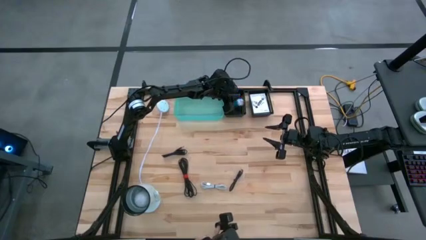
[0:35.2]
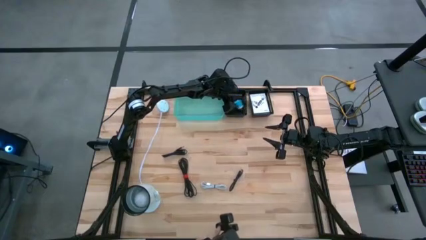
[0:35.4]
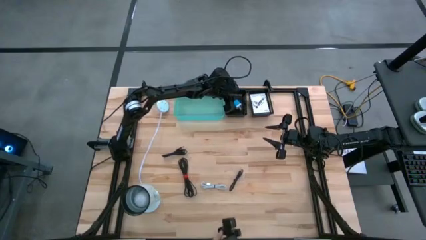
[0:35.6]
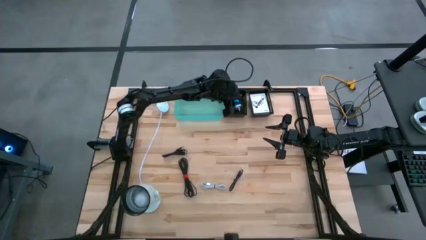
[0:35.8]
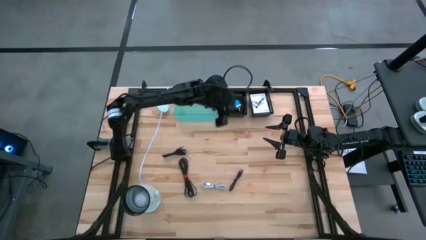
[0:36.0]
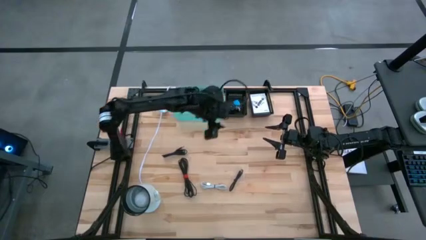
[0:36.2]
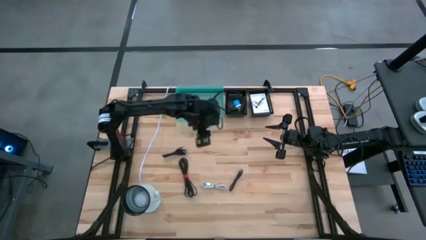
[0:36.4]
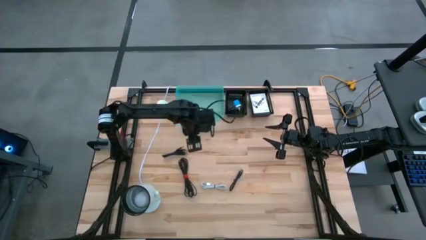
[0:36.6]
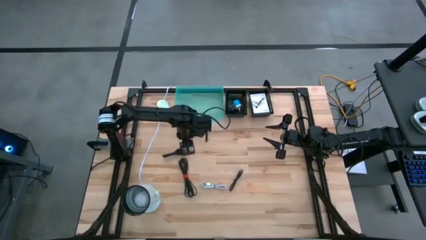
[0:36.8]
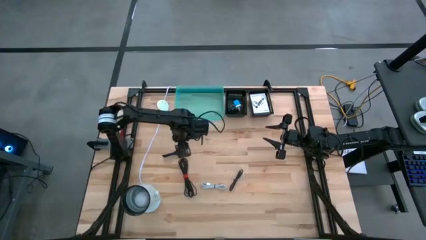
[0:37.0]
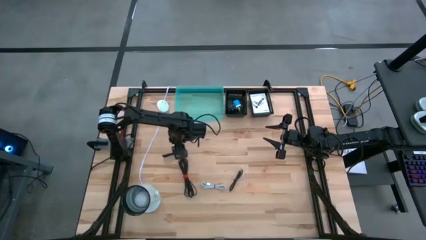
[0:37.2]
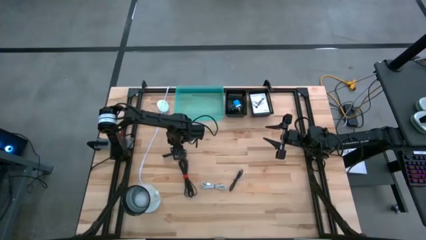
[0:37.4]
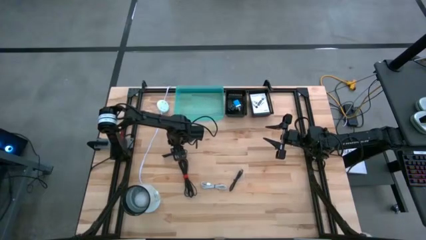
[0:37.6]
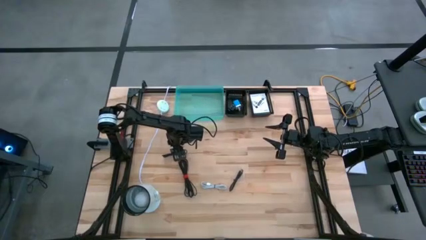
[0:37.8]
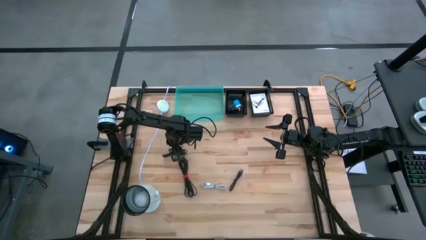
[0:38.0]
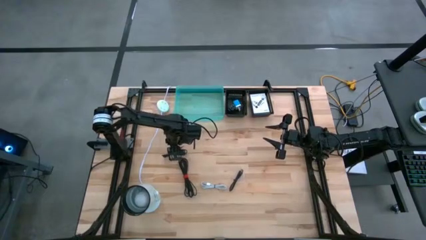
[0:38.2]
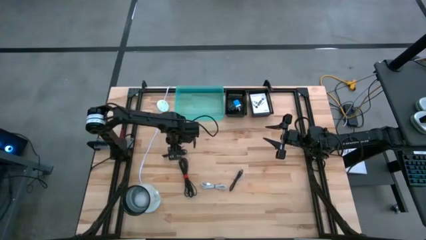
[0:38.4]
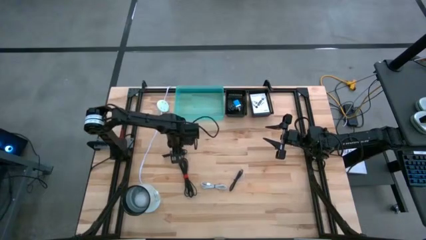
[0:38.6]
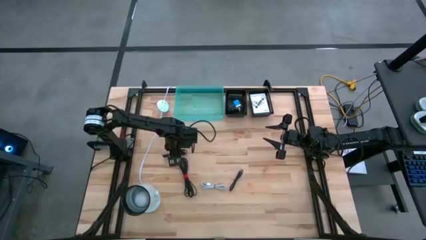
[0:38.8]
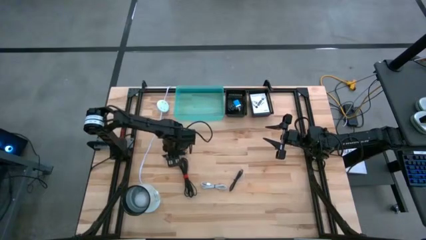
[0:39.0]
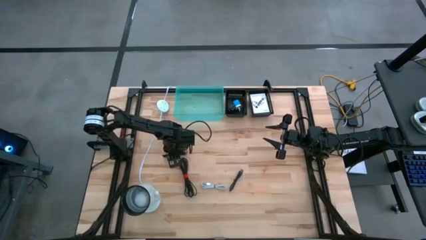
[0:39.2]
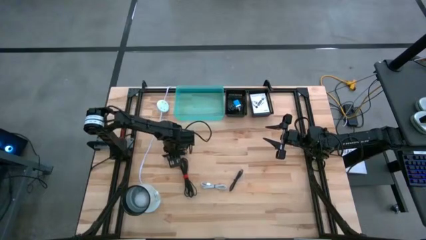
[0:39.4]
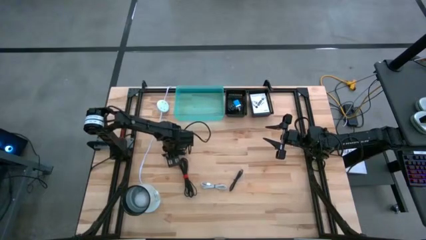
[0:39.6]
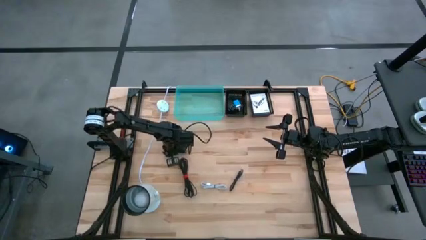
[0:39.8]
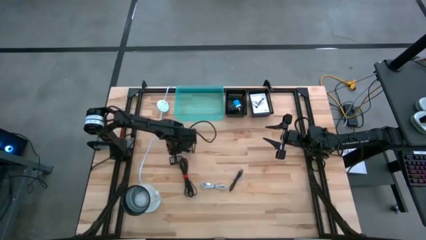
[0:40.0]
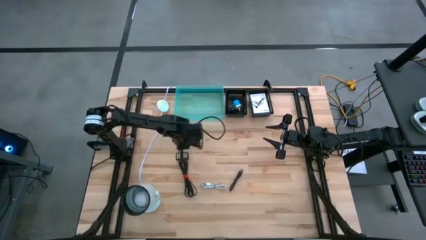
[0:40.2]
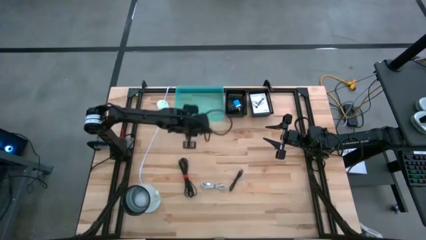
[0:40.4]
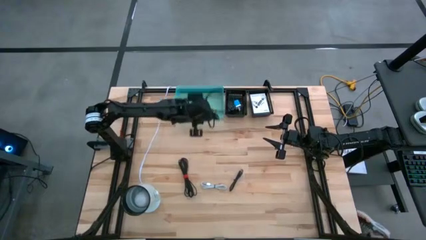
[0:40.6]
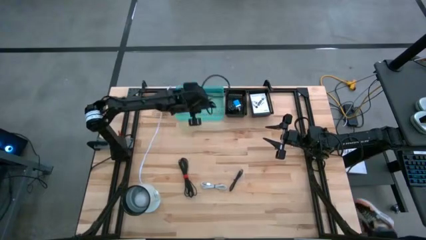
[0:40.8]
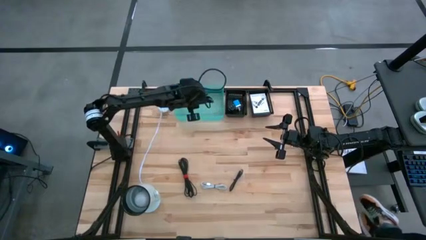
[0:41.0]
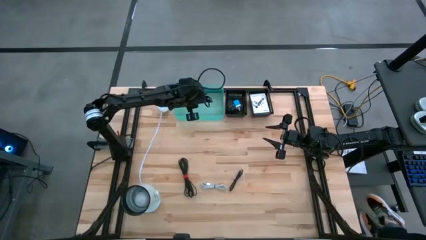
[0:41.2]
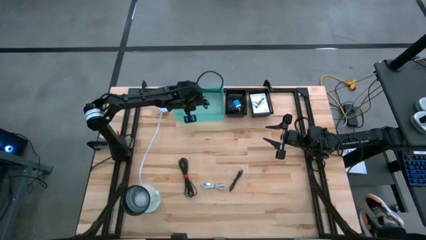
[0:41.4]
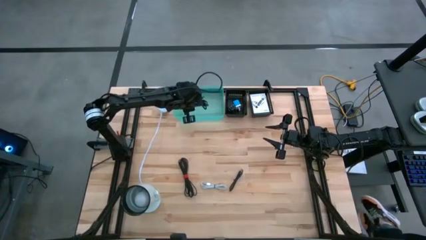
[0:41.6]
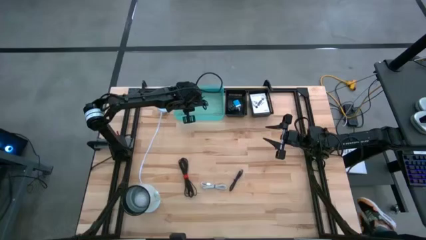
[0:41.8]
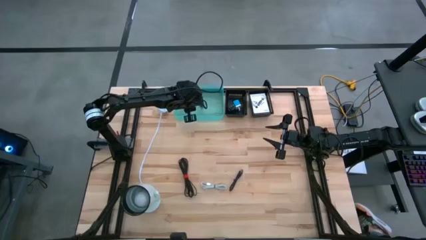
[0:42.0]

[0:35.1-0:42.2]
Task: Pick and place items into bin
Put the top left black charger cable into the blue bin

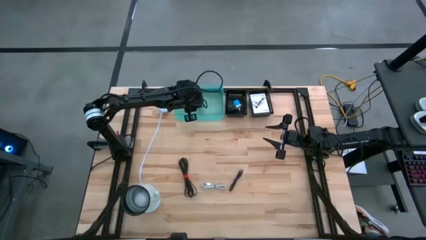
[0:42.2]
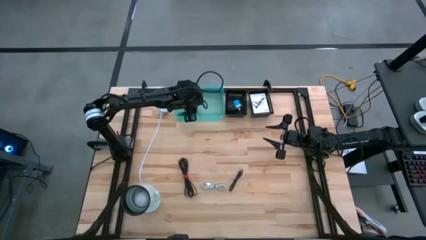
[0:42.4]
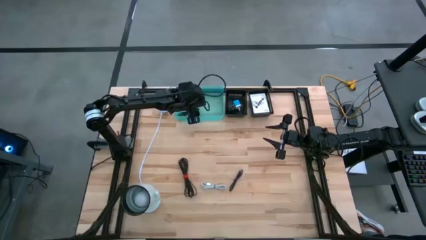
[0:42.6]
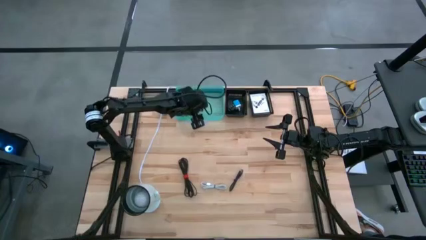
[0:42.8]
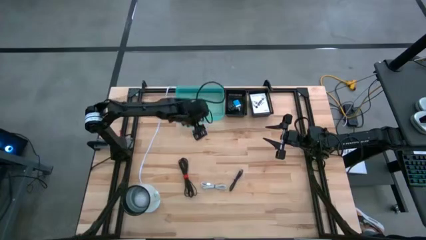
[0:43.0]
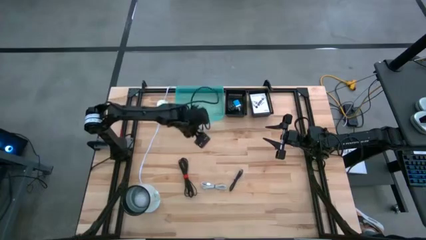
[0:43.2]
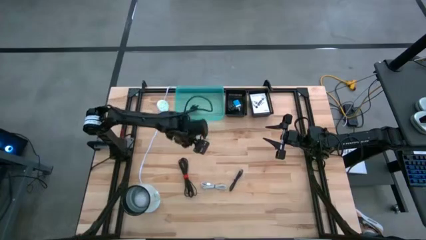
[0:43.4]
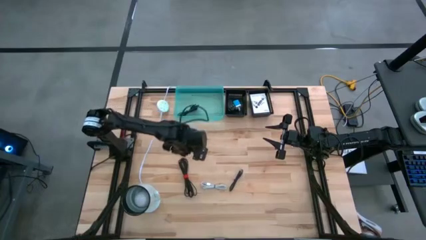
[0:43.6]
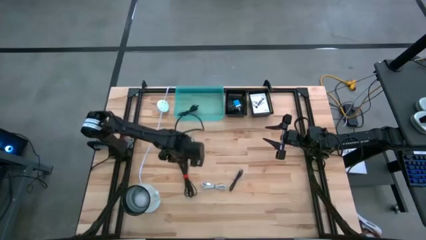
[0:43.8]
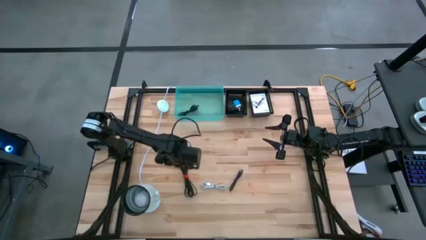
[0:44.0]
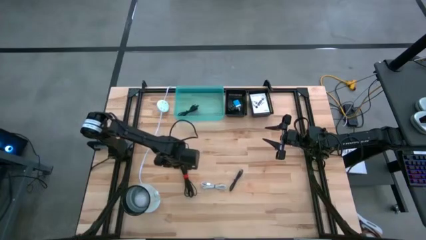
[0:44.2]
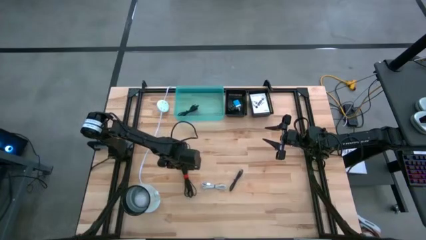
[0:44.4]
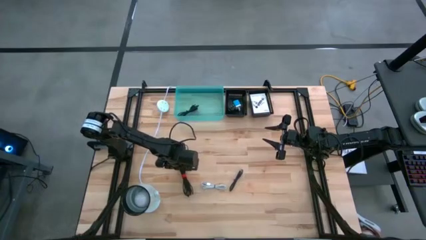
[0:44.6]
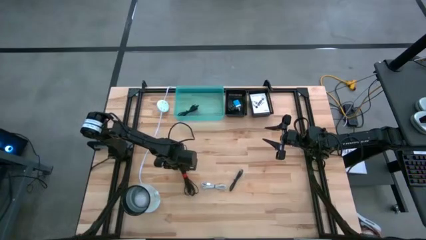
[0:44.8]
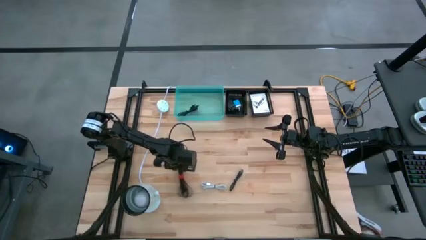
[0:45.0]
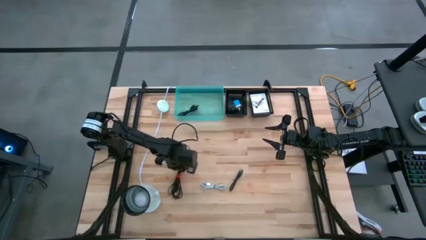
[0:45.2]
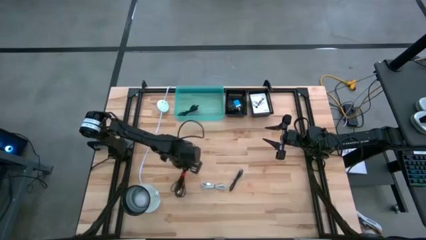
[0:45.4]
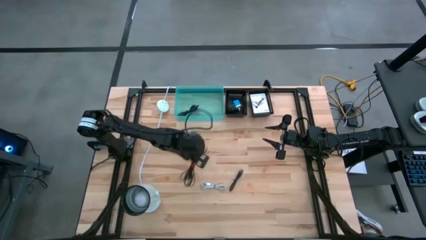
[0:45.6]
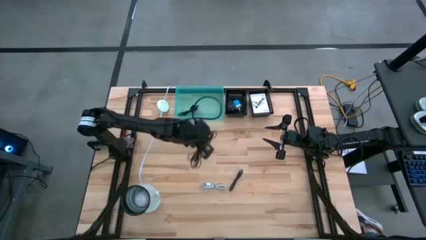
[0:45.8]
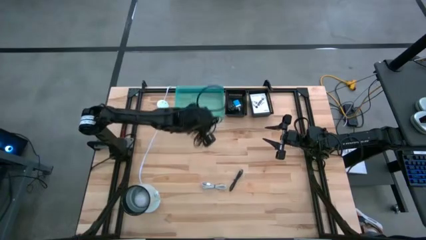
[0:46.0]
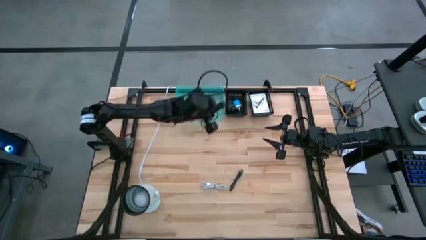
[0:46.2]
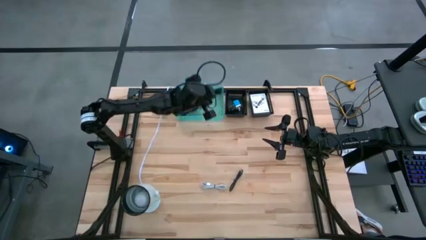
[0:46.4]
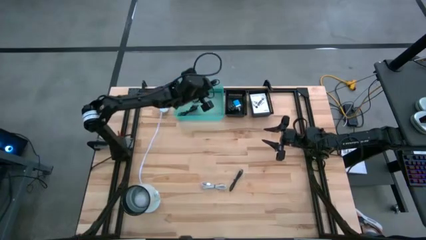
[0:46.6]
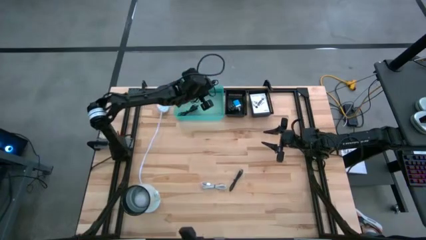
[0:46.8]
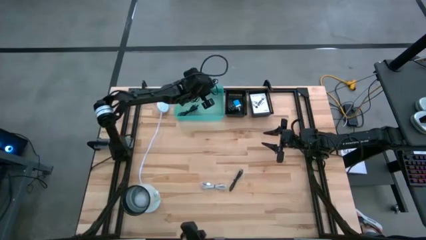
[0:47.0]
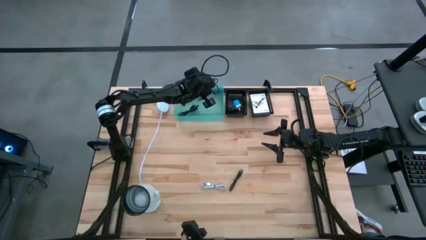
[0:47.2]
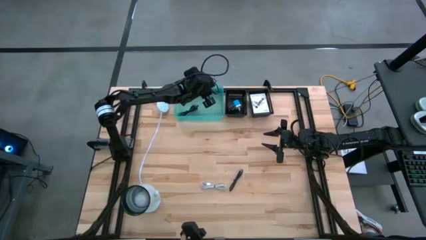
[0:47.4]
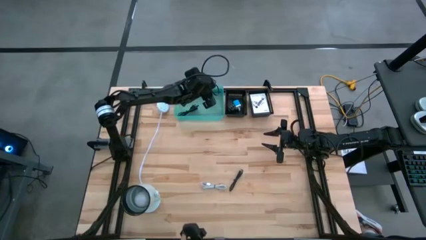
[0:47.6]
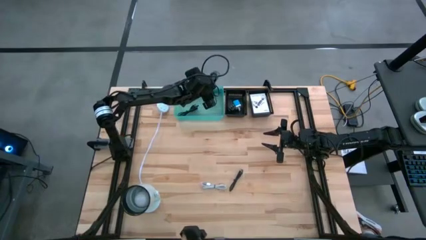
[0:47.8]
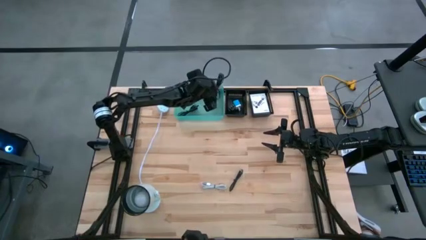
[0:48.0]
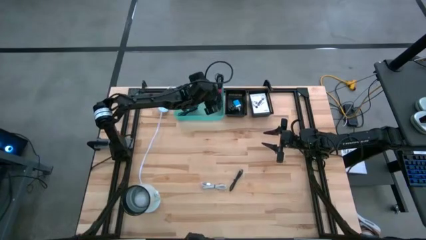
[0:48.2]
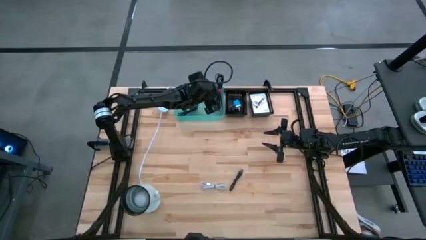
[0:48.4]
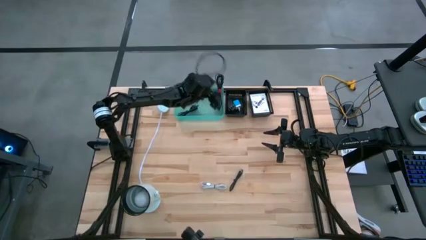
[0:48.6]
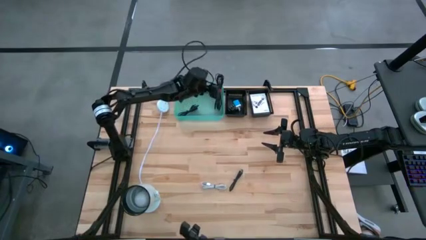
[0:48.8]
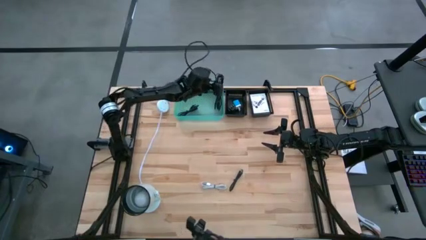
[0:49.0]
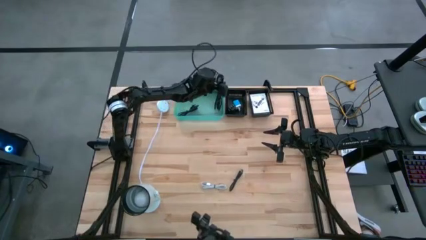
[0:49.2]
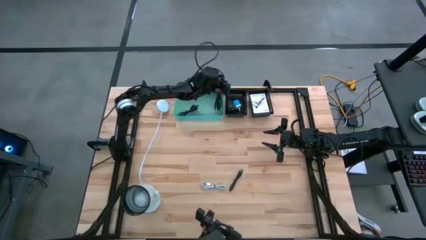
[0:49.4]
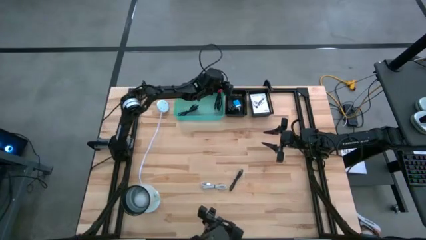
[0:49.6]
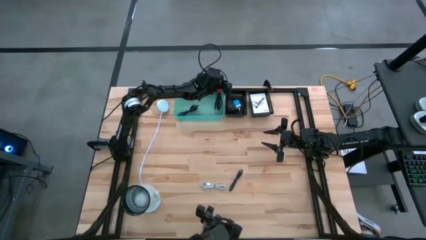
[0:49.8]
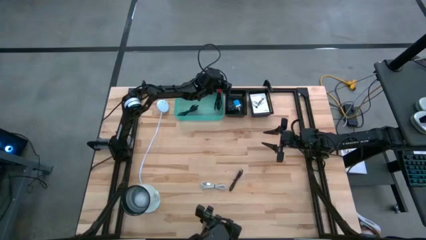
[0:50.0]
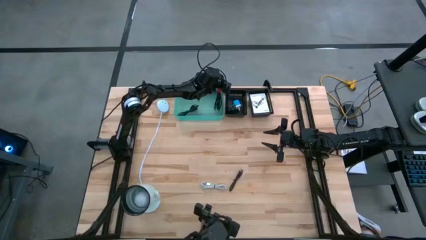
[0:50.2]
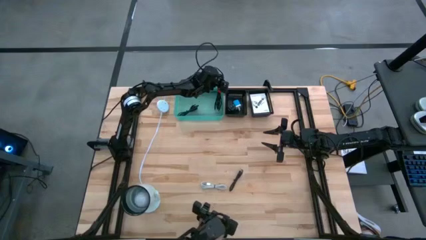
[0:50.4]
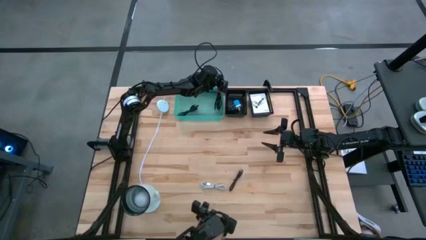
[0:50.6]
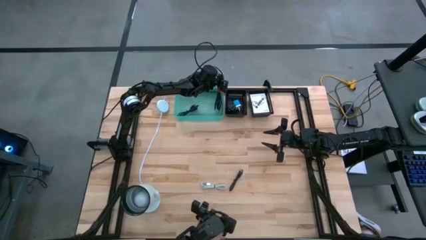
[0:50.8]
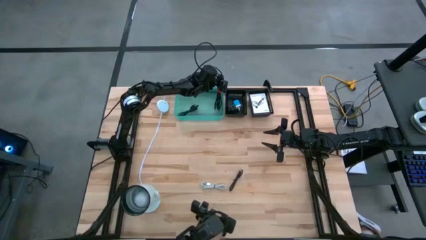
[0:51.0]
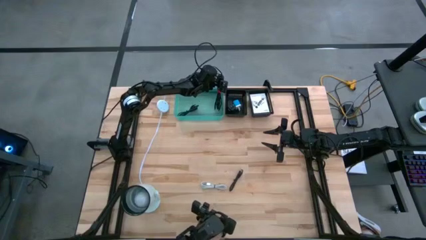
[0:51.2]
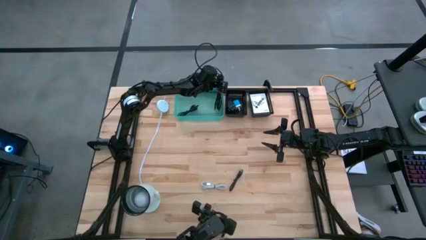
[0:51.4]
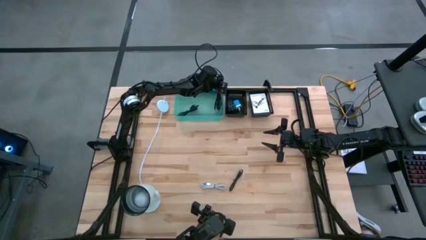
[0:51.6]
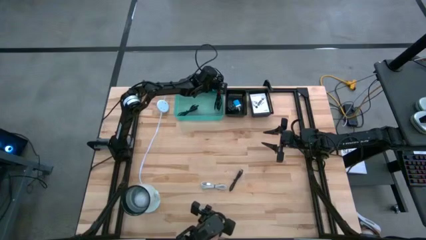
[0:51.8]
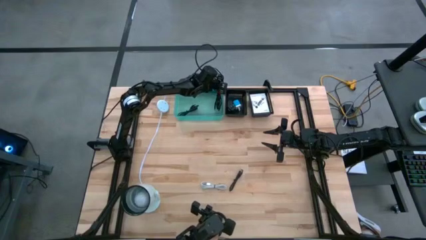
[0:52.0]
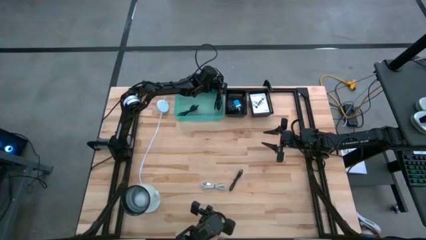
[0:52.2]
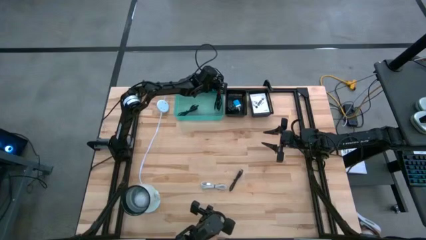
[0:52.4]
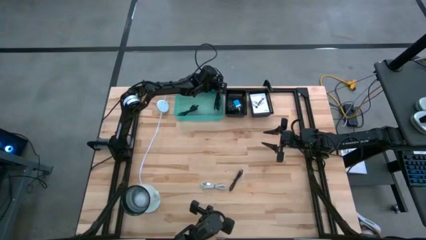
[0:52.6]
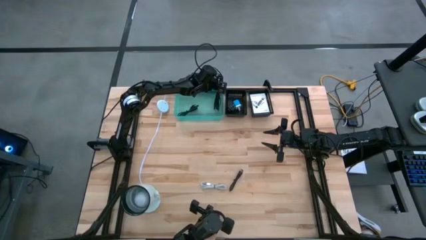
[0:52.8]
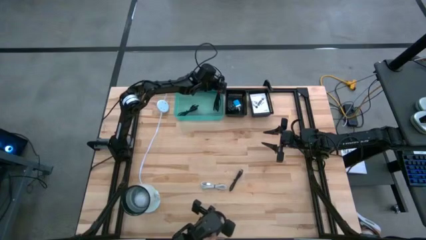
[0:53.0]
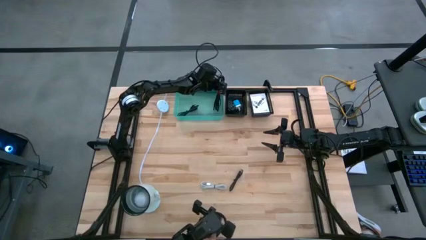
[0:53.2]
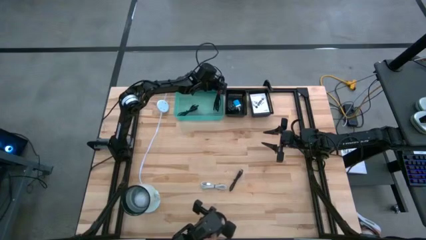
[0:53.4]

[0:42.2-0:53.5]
Put the left black charger cable into the blue bin
